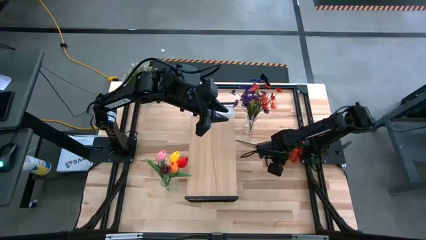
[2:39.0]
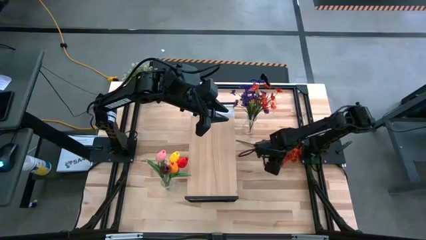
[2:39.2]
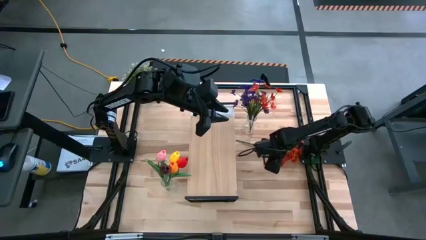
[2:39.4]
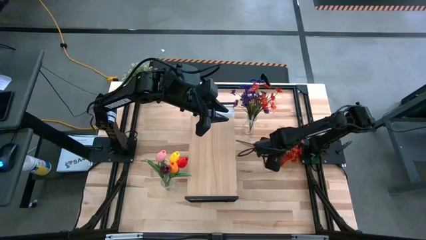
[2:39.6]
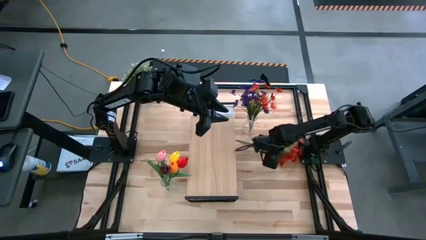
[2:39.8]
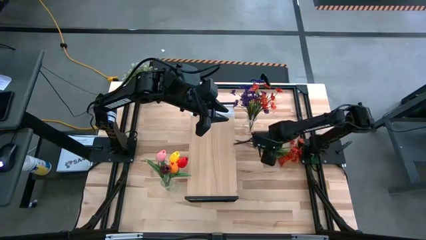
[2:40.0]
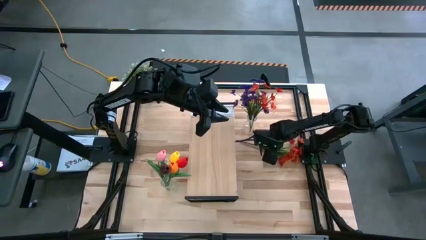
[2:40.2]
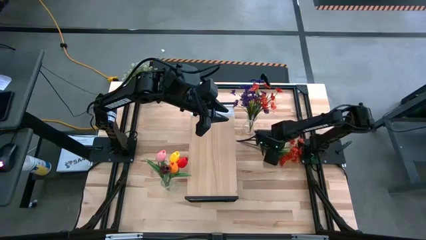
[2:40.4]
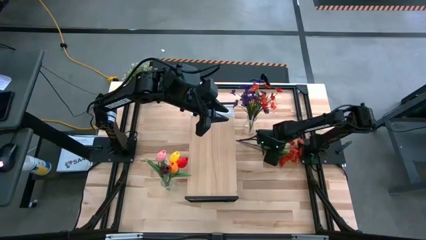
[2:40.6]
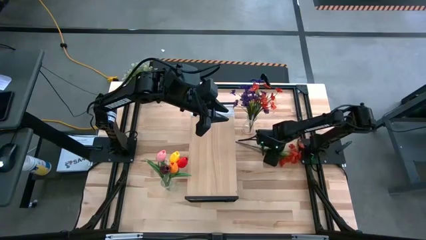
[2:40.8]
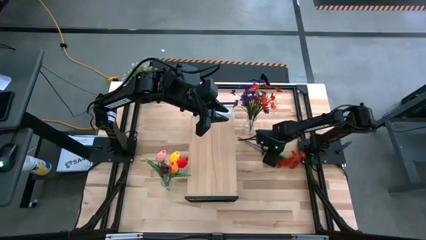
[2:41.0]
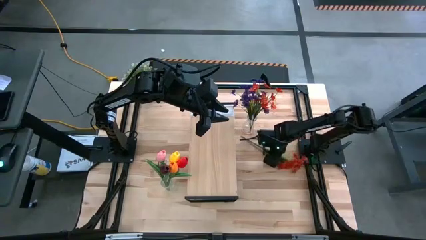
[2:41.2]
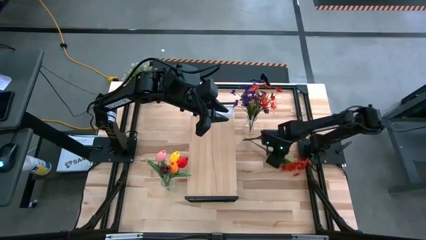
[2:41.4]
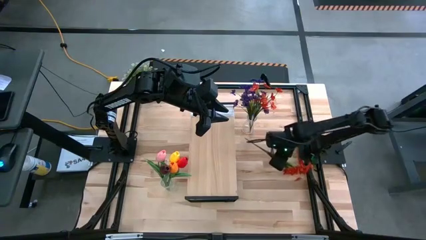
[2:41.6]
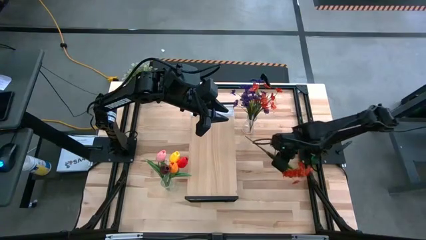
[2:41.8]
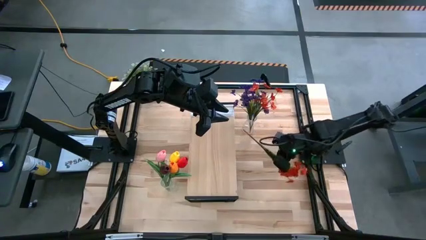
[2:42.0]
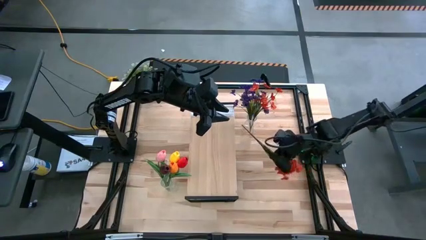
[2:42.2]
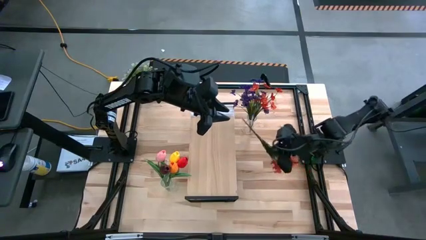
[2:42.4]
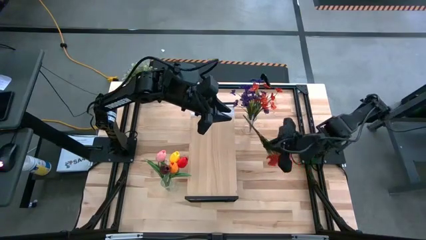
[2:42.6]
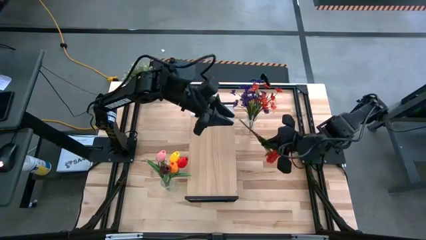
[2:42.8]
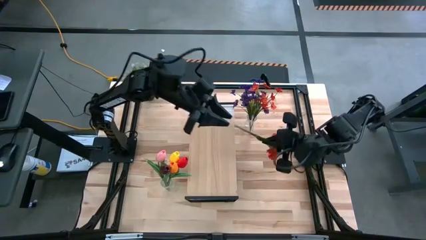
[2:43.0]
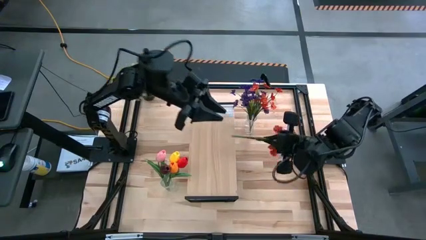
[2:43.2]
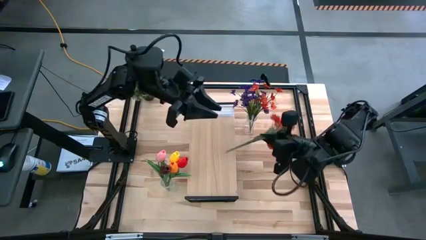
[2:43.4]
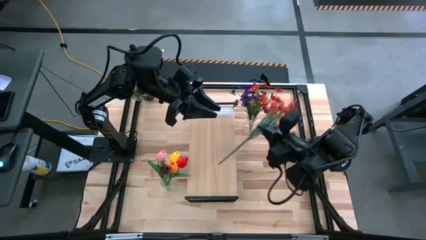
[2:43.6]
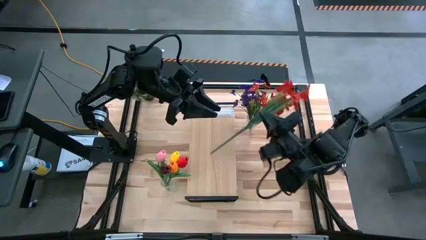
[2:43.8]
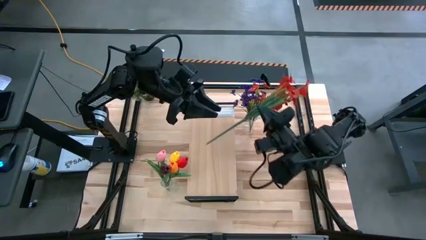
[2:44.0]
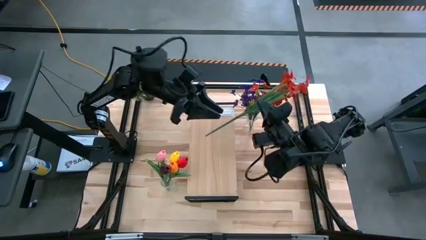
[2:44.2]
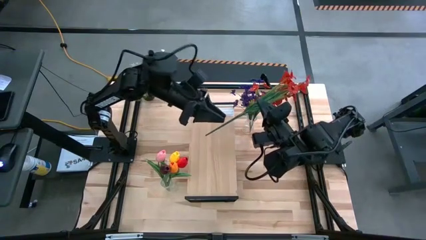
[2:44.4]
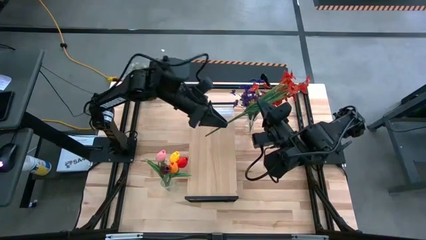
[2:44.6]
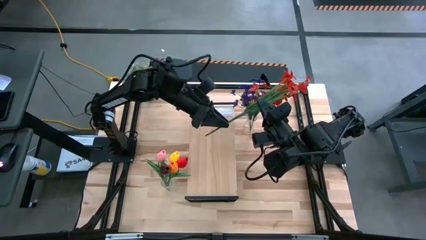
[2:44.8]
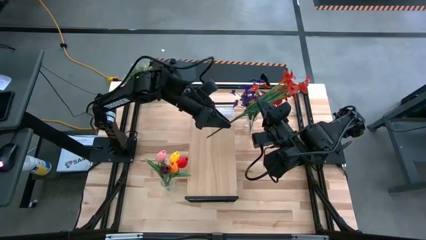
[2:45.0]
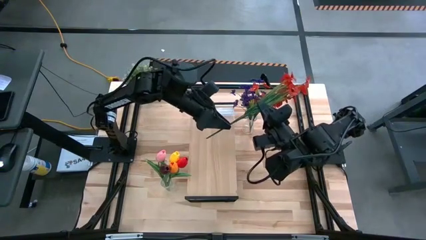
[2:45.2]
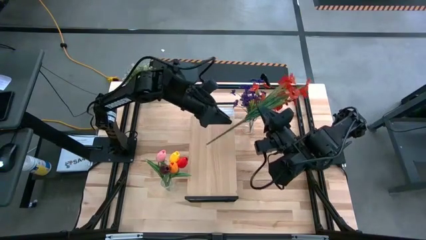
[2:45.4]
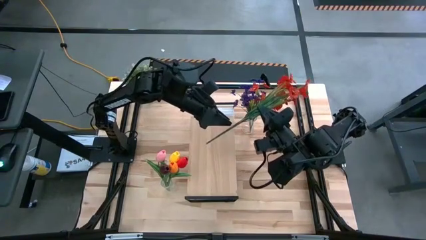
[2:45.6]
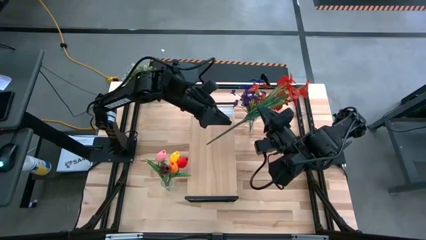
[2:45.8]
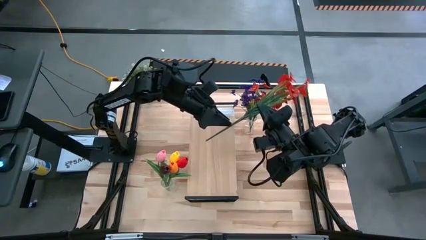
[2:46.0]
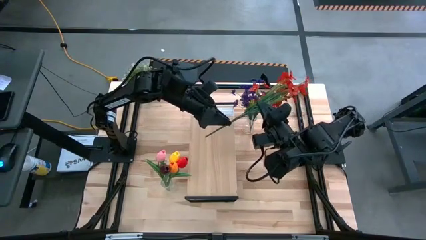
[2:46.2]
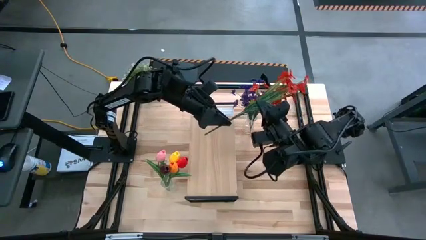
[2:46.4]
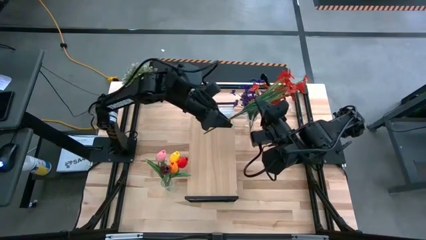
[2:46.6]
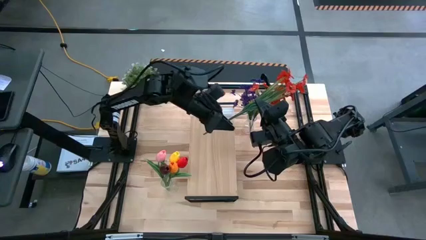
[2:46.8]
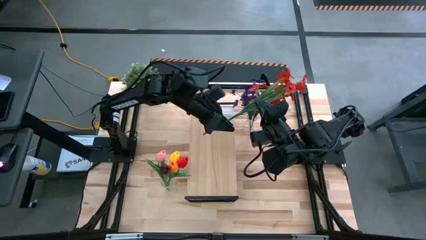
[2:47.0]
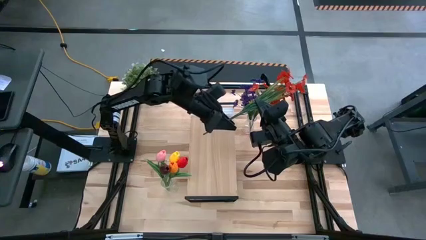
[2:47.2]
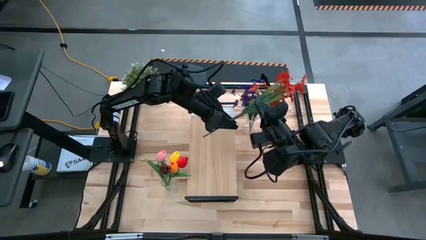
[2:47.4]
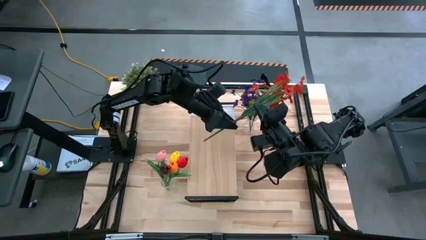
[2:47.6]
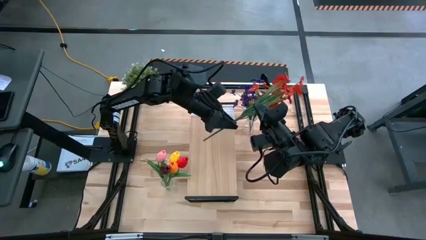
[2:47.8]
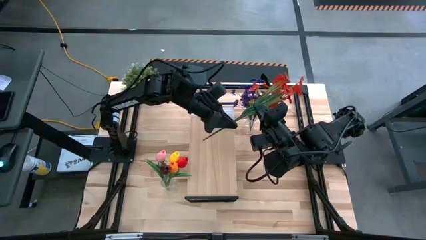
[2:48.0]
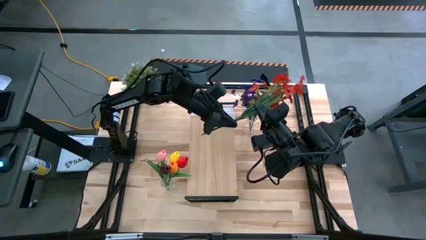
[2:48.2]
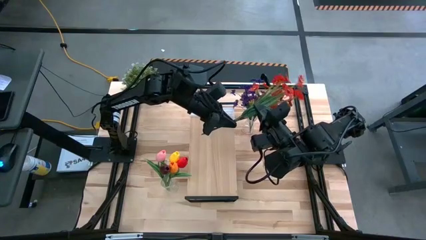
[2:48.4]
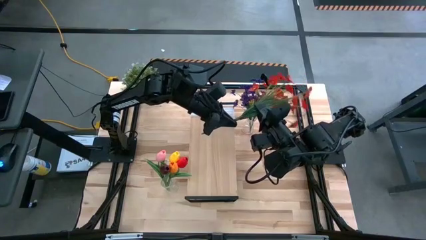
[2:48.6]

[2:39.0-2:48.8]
Task: Pick and place flowers into a vace then onto a shelf
Put the red flowers into the top vase

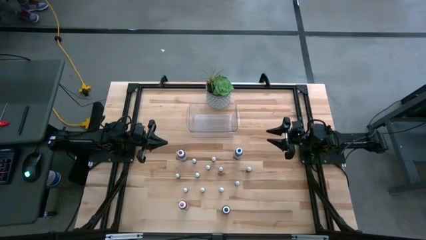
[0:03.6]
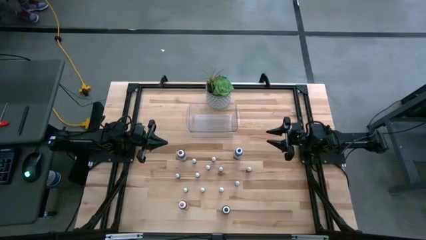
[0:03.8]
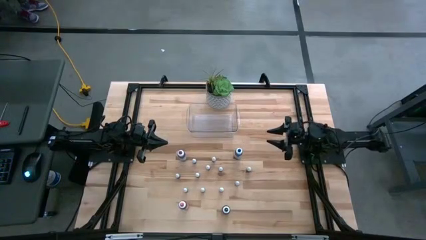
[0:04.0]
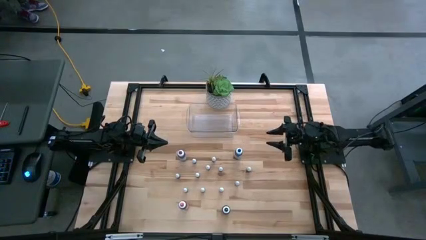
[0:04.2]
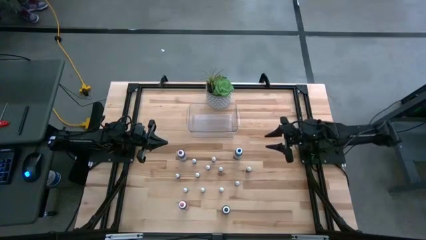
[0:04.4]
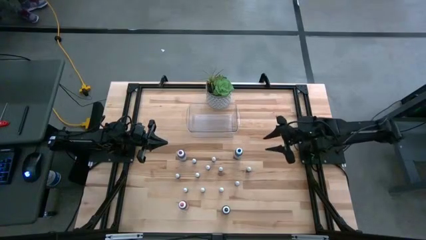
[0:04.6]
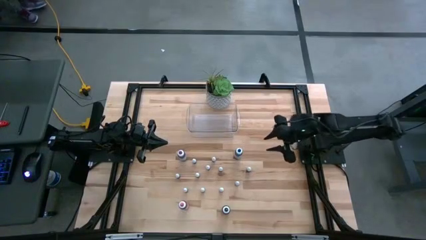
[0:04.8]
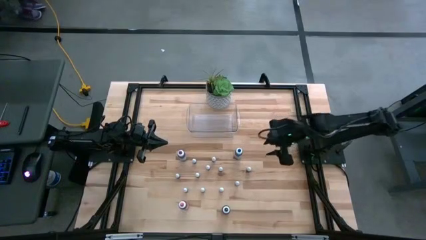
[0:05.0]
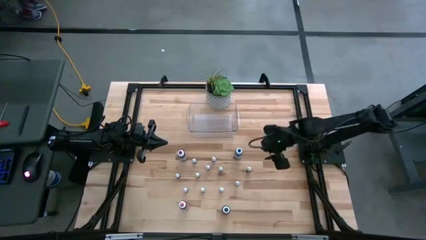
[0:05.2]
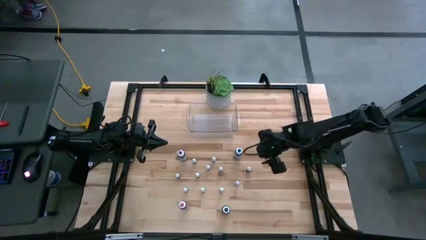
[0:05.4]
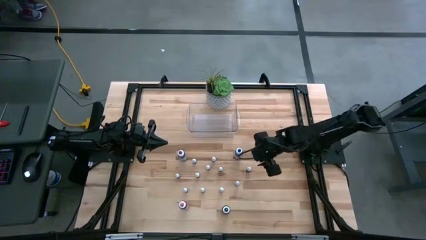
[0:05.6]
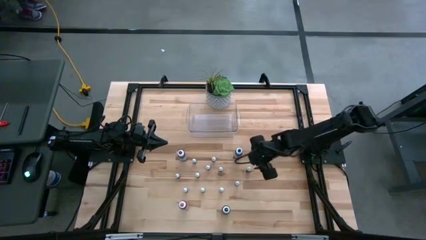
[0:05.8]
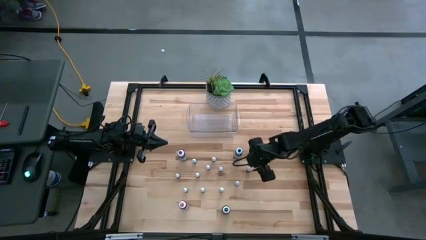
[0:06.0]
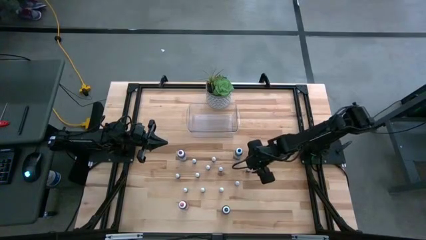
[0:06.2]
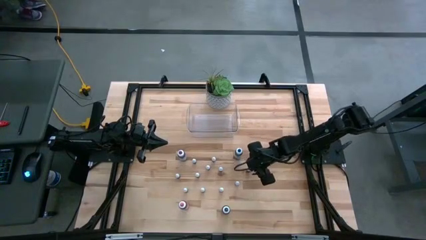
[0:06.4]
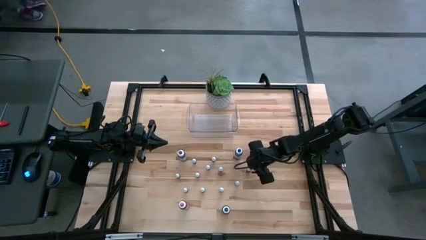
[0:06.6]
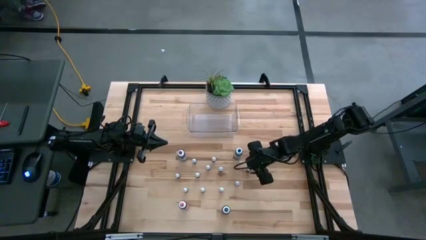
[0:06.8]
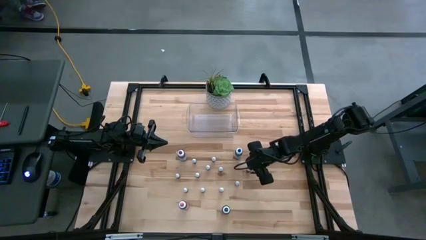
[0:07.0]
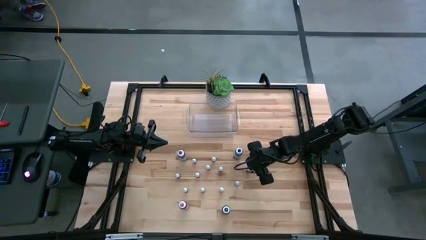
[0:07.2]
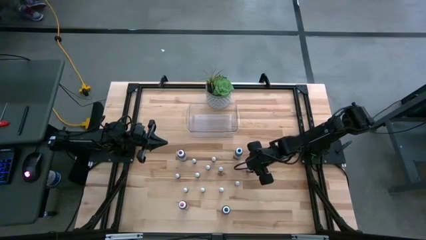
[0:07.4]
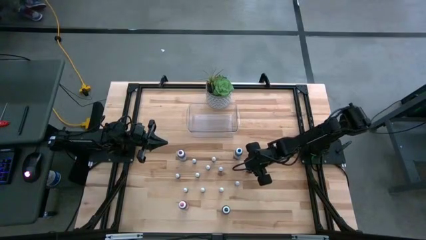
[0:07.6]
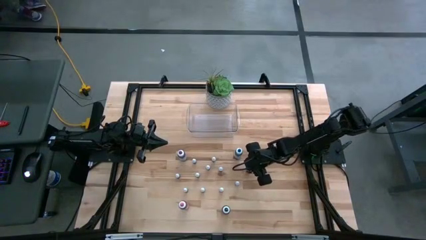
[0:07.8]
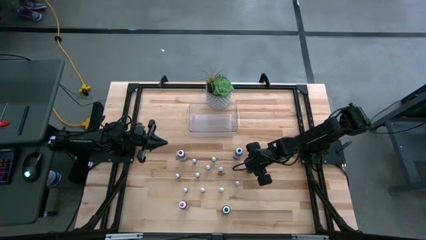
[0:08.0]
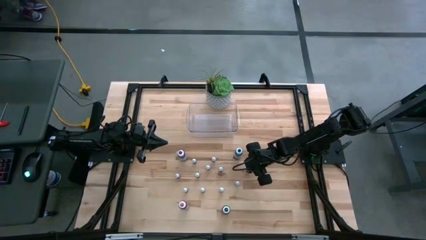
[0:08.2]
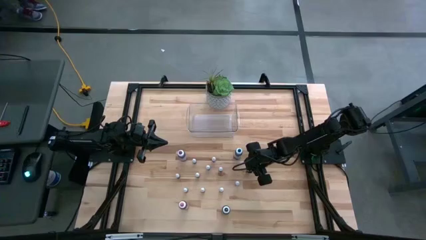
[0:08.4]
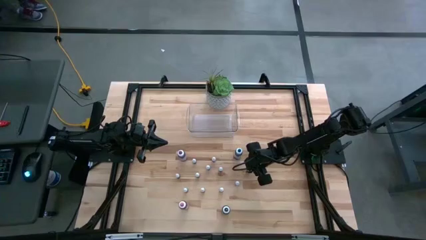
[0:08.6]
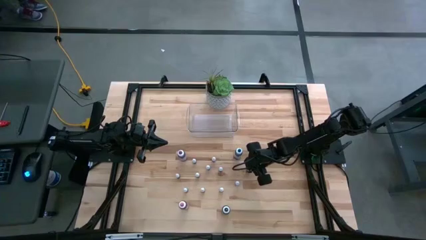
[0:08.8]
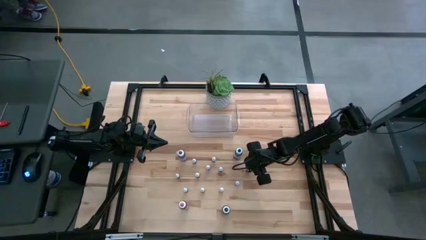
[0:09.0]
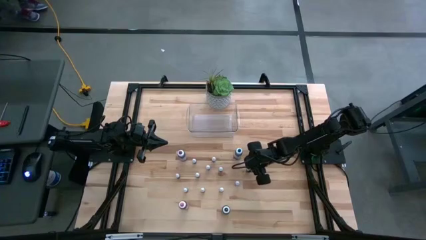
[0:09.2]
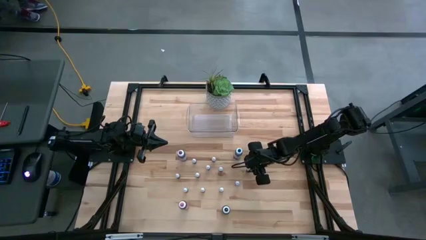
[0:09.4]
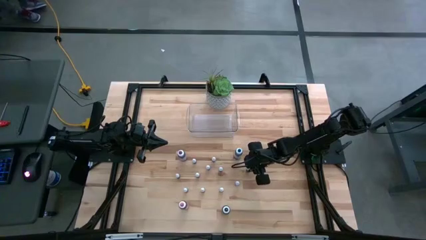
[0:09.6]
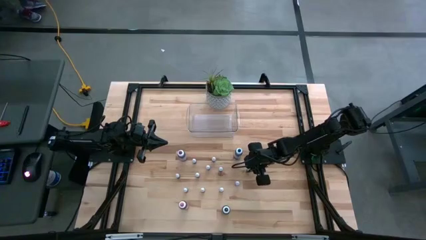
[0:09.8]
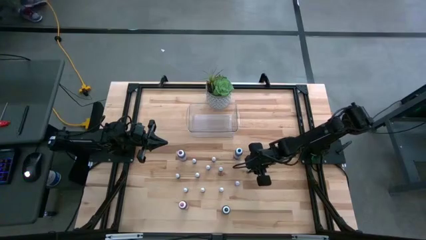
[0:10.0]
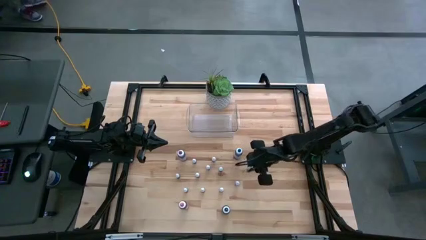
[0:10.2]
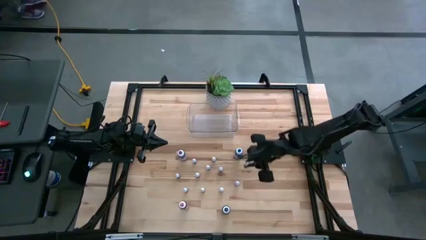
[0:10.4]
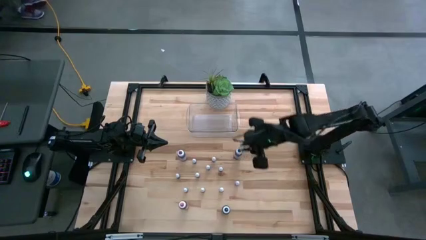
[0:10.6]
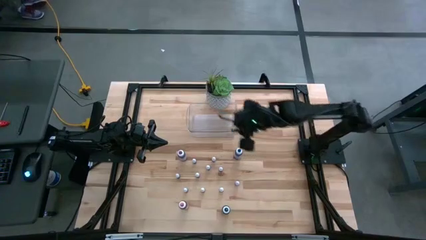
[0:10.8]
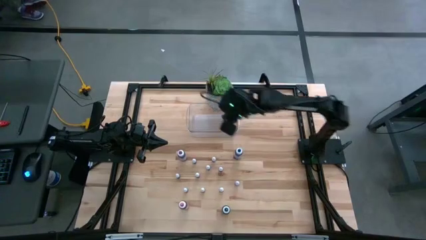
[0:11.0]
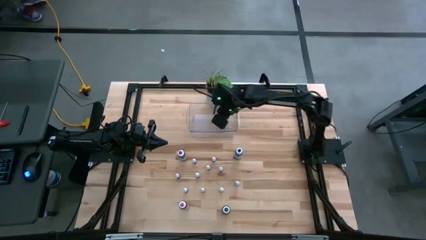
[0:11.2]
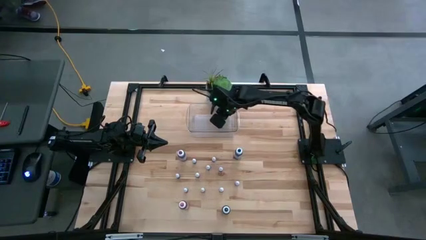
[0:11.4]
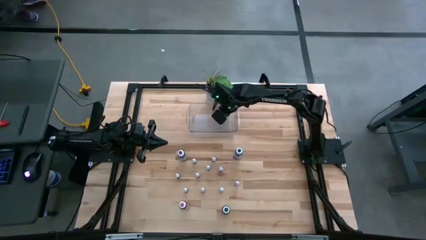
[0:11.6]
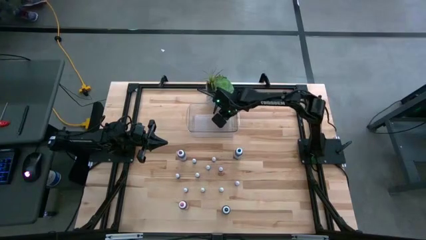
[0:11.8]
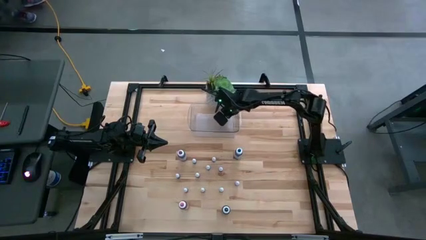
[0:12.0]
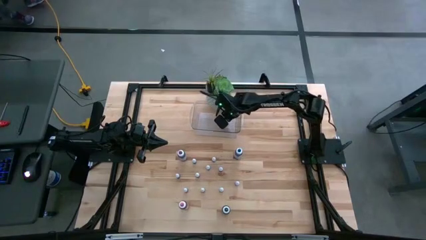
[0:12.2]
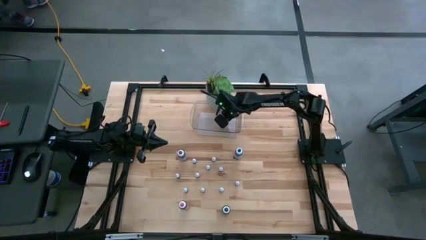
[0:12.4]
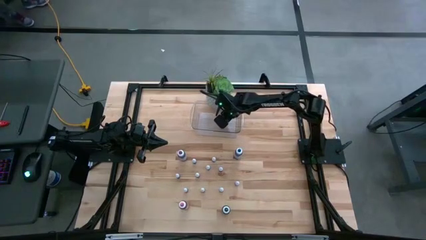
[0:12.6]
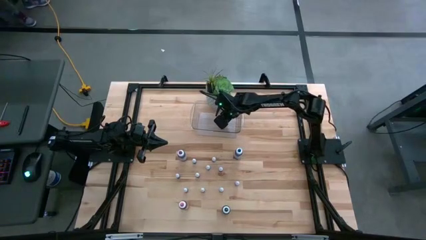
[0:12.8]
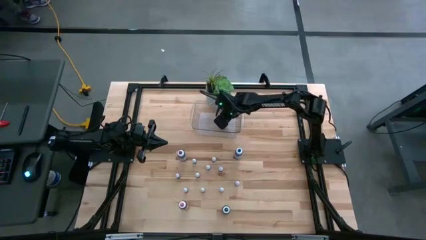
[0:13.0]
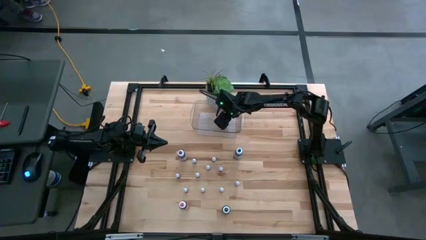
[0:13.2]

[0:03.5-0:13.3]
Task: Pick & Place food coloring
Put the small black food coloring bottle into the bin
